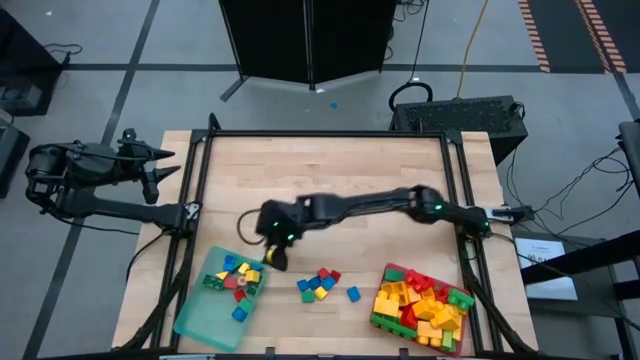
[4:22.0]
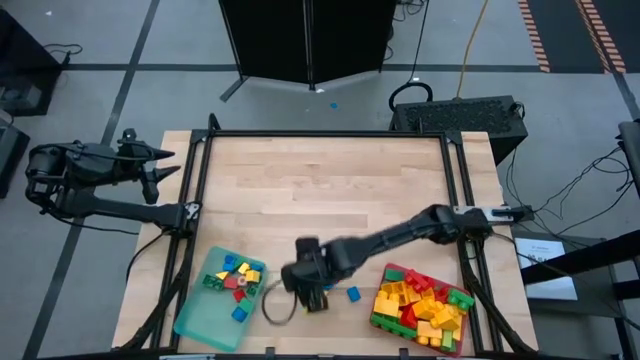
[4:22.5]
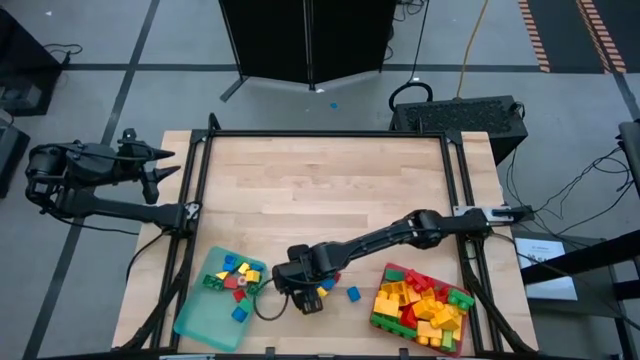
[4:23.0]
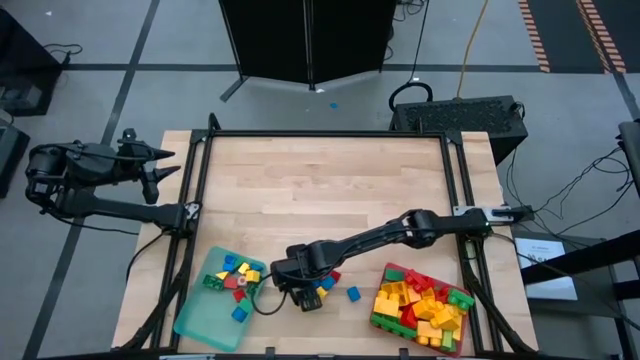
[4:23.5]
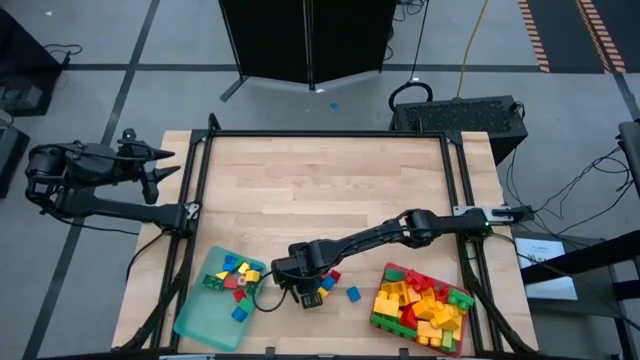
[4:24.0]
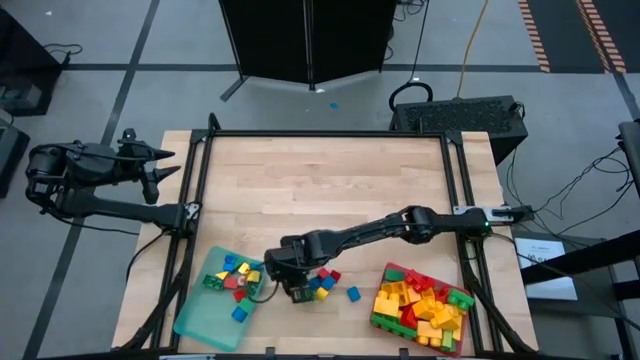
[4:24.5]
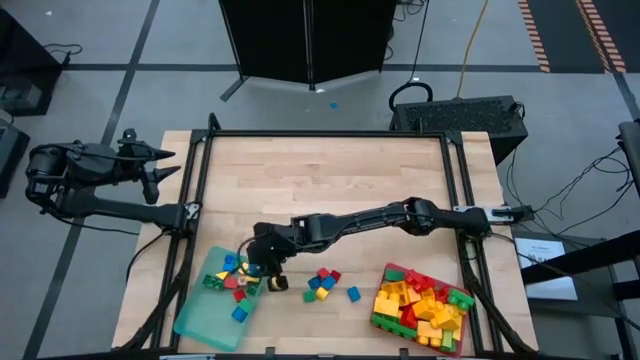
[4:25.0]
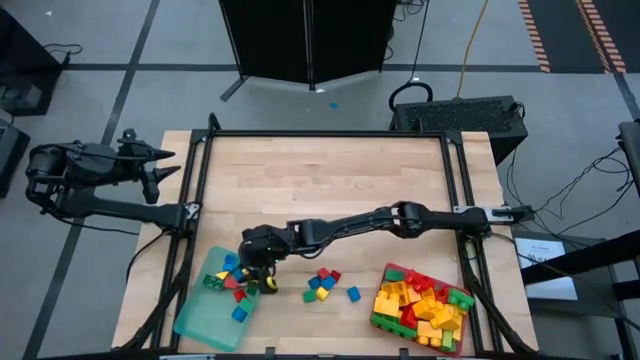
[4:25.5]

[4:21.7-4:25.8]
Task: Sort blocks by size
Put the blue block into the blue bin

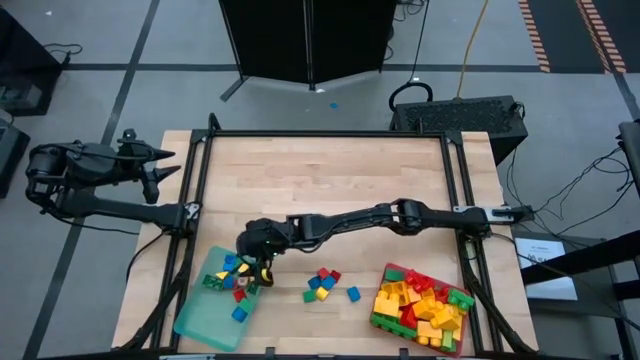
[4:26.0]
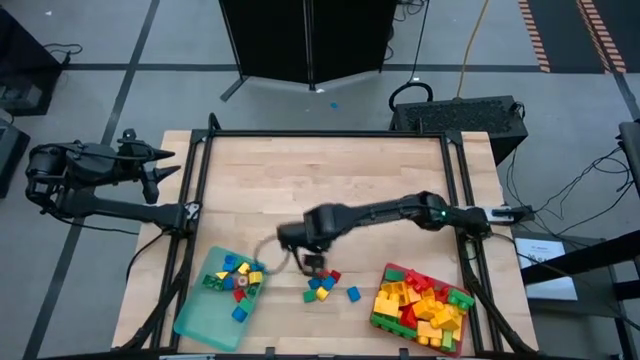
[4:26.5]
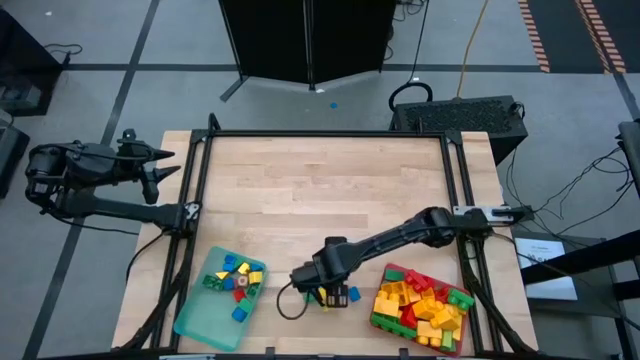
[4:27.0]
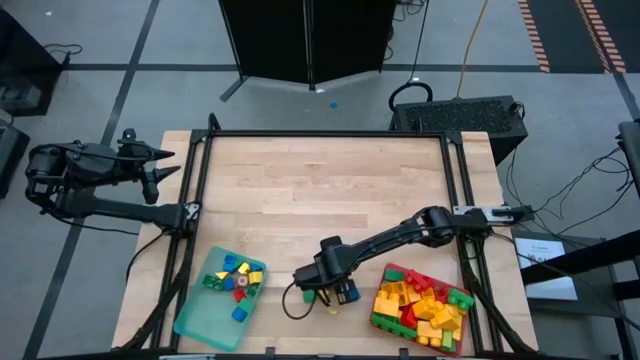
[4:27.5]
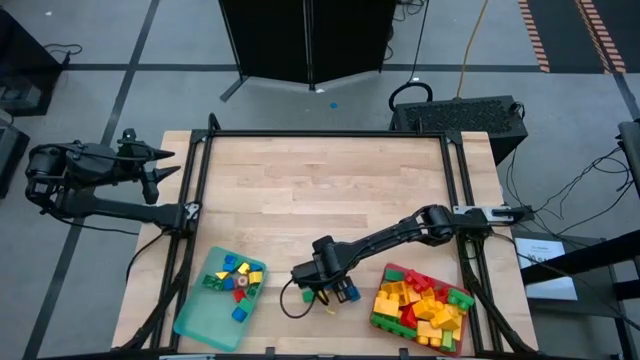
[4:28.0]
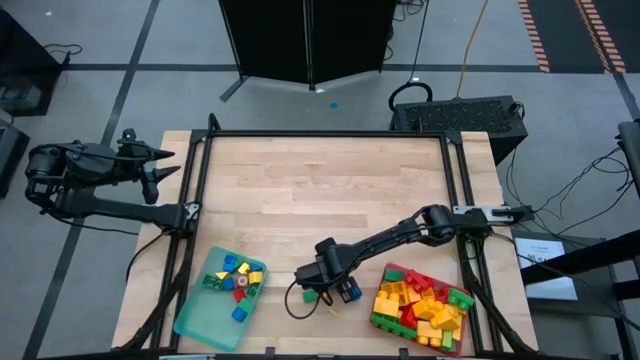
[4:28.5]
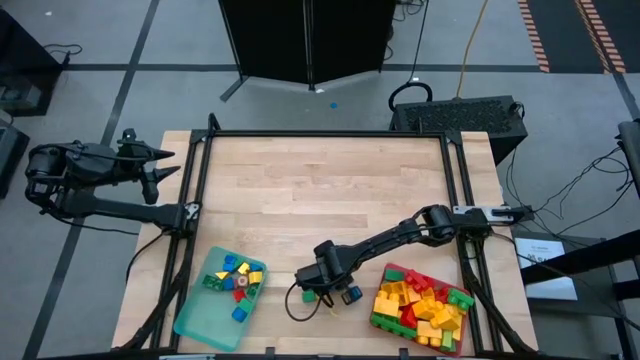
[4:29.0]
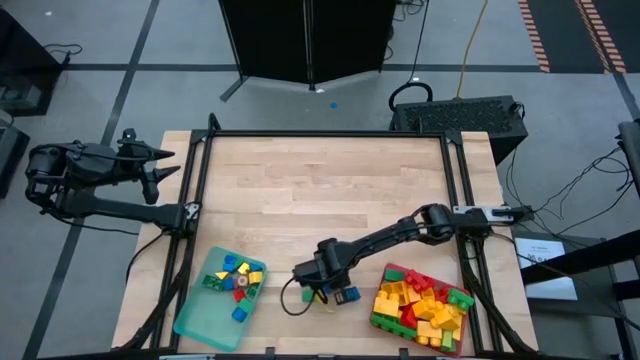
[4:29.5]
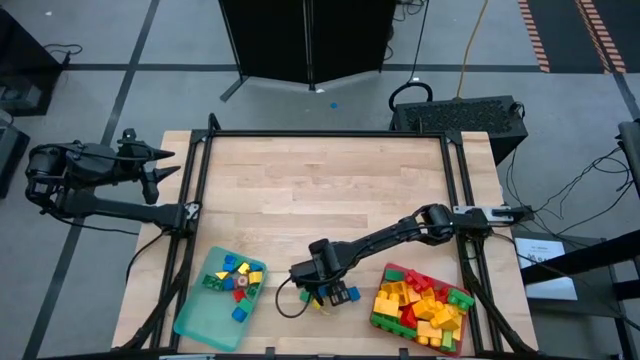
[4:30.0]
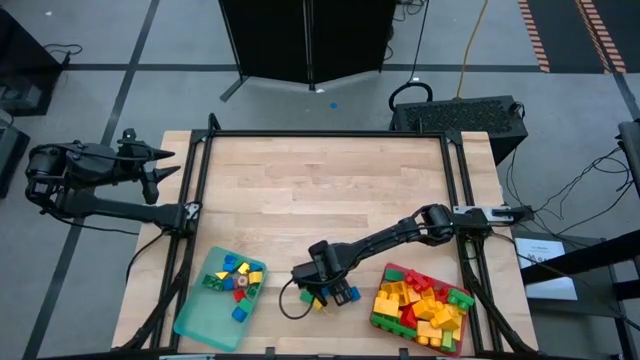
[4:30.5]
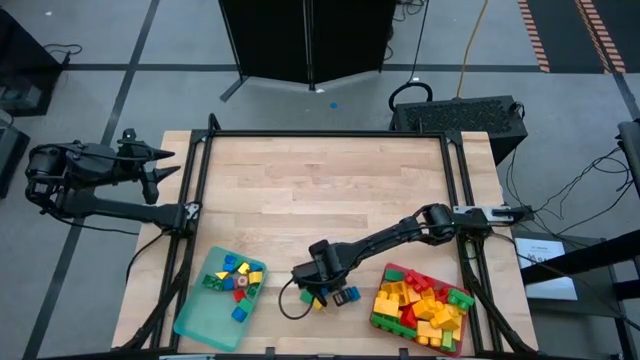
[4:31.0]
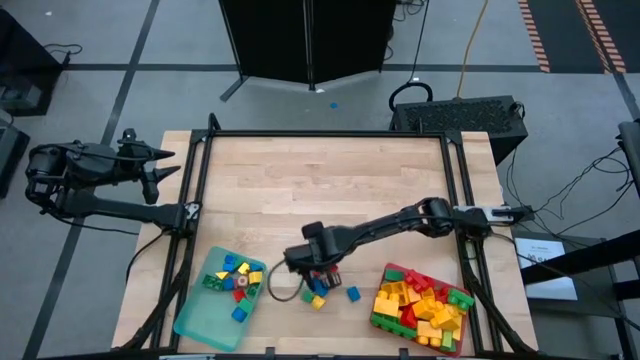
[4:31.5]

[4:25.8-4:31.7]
Put the red block into the blue bin

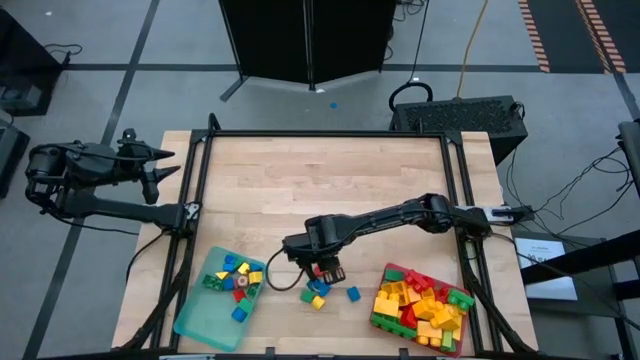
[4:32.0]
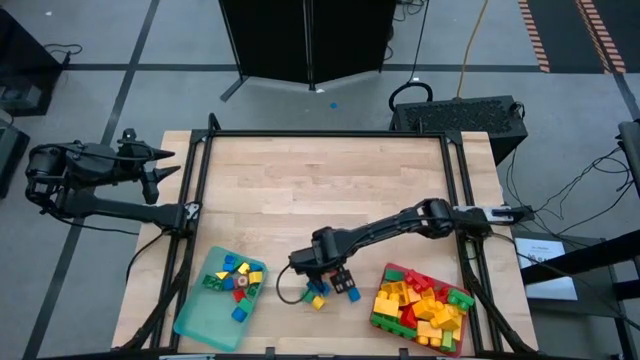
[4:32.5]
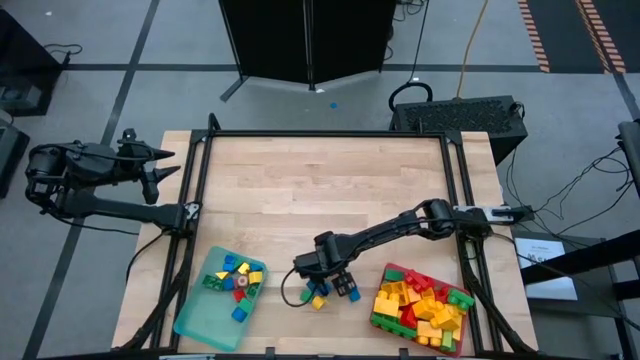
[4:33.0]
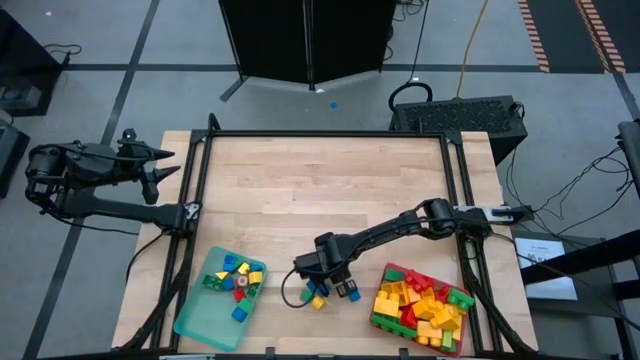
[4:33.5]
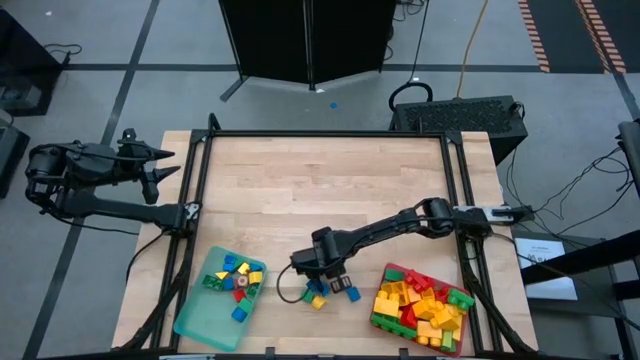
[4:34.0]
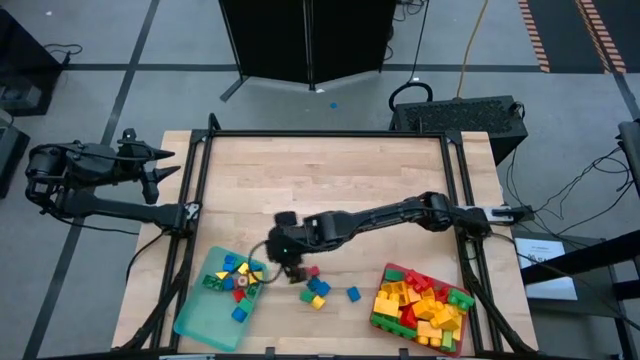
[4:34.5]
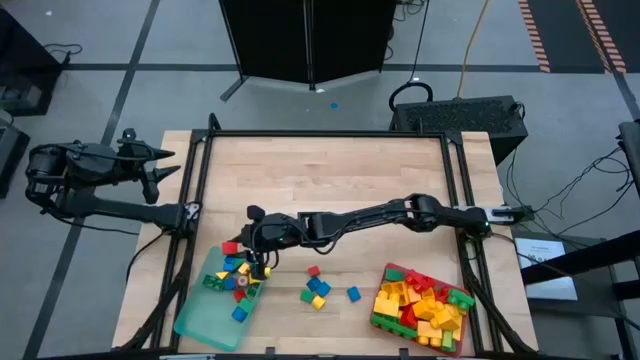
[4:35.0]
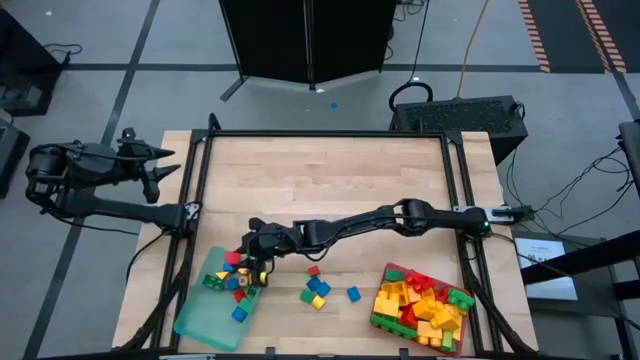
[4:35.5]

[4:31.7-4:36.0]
Put the red block into the blue bin

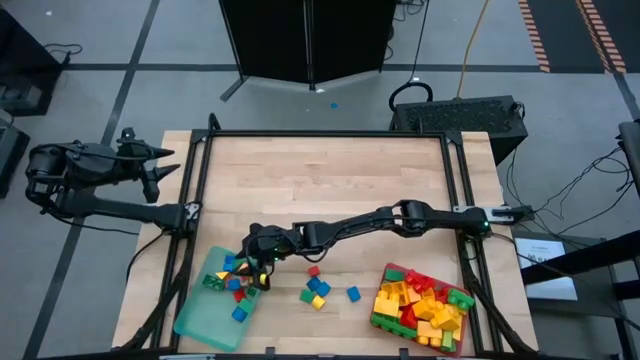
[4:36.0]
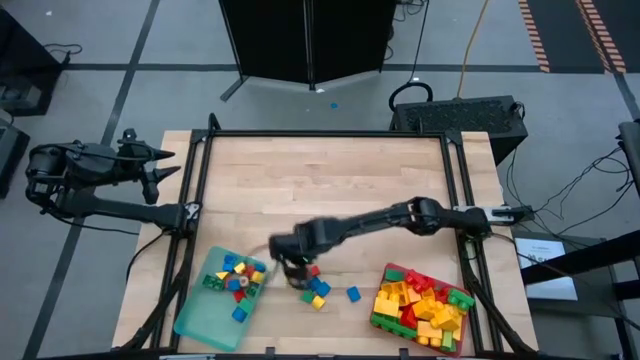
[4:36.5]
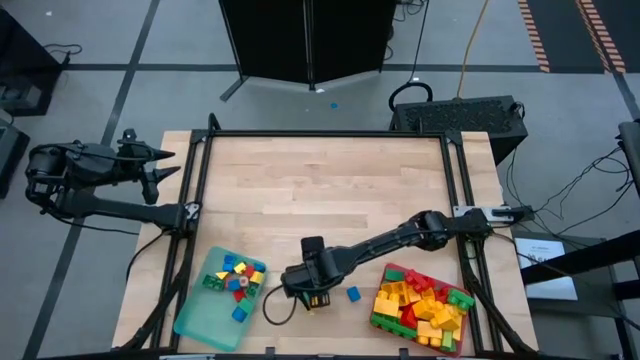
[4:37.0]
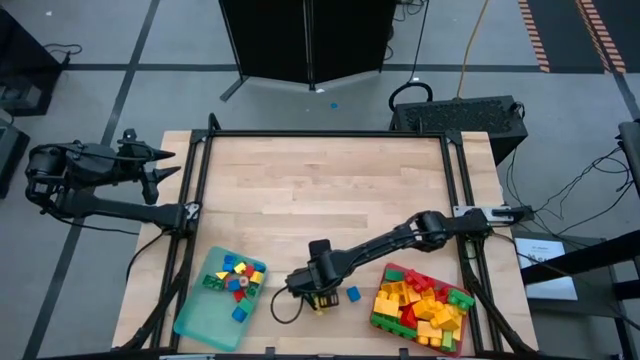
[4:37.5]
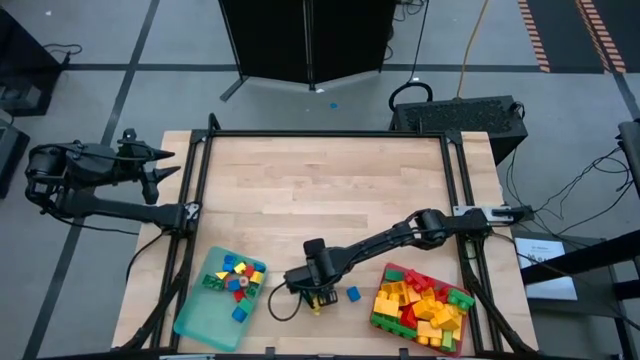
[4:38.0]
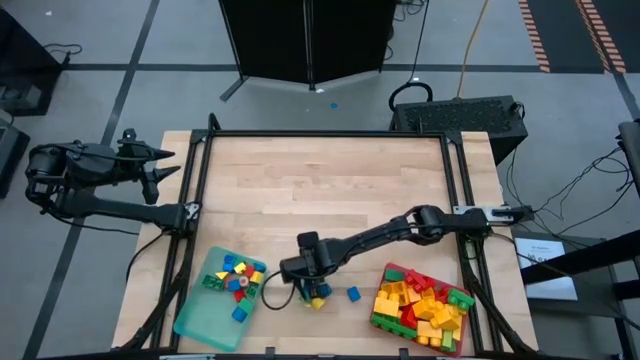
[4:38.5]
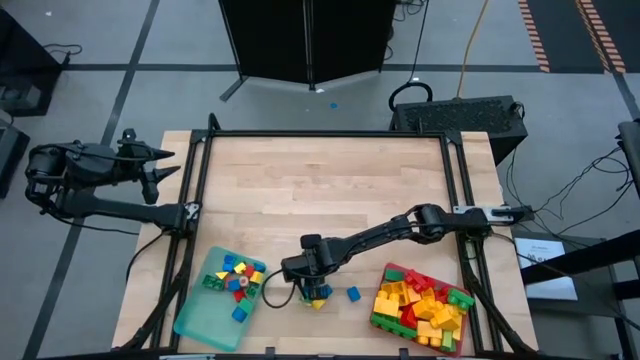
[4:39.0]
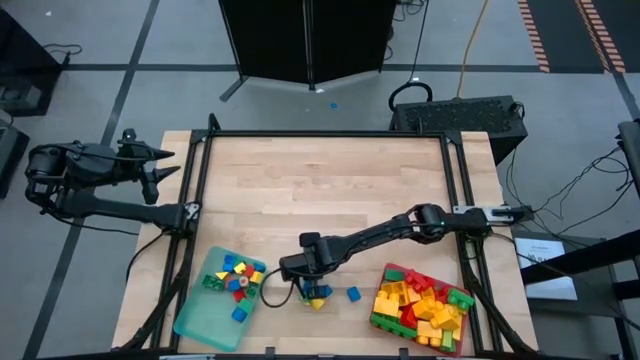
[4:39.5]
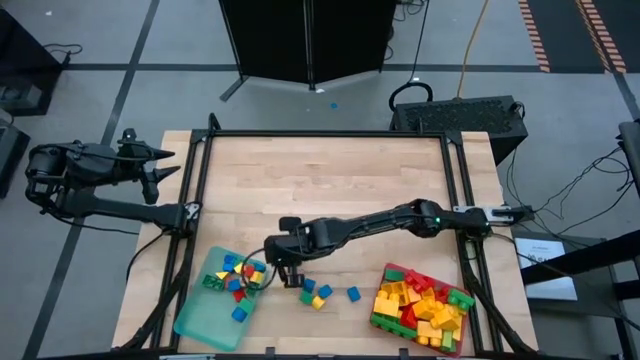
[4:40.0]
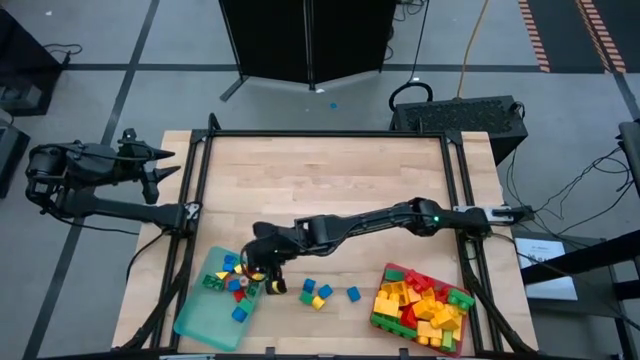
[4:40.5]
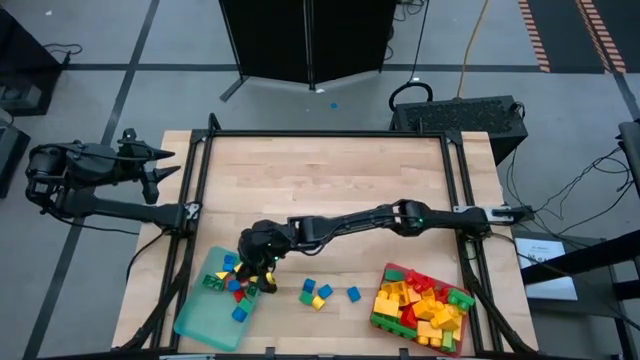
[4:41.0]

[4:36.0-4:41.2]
Put the red block into the blue bin

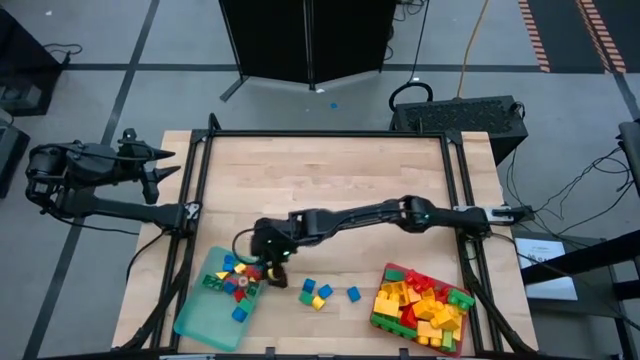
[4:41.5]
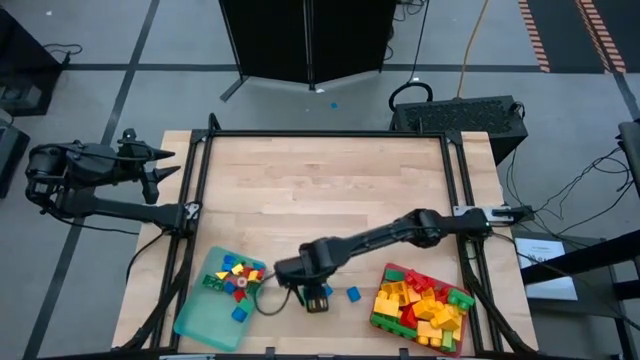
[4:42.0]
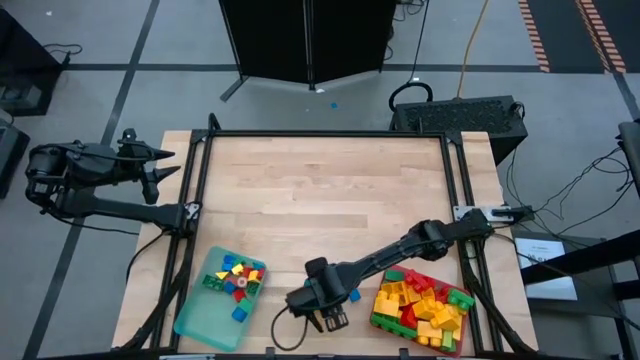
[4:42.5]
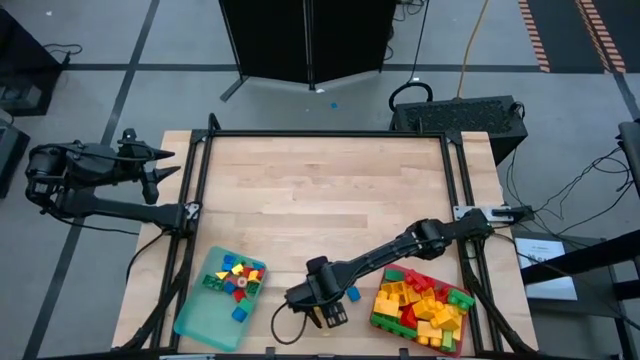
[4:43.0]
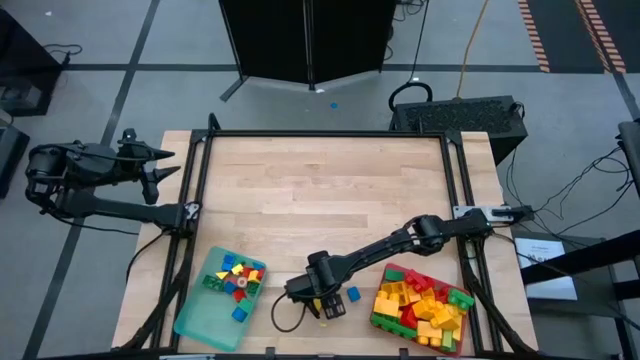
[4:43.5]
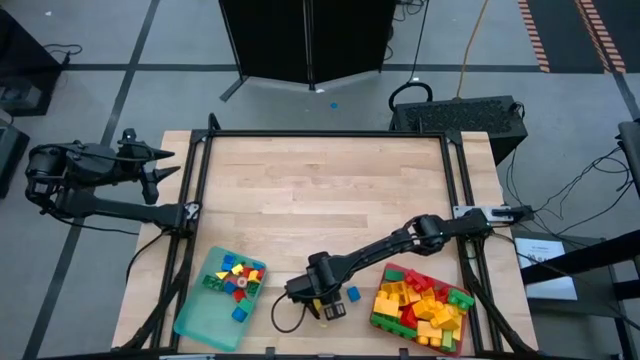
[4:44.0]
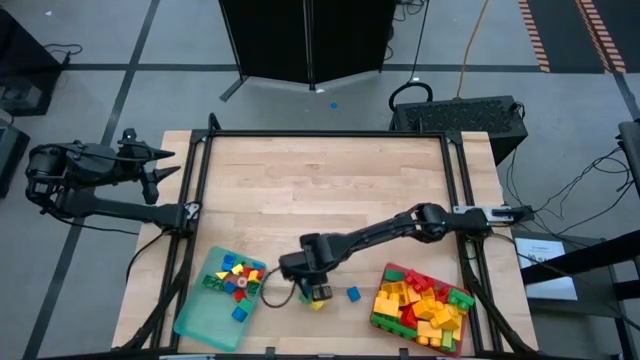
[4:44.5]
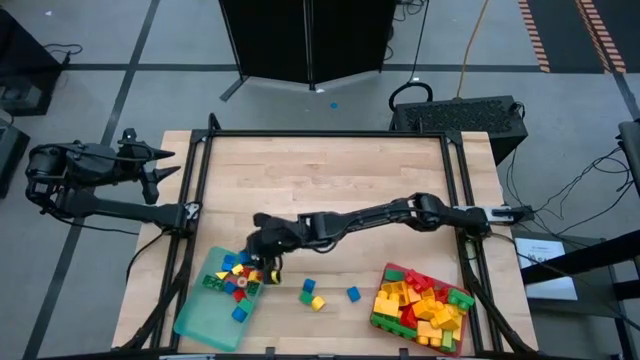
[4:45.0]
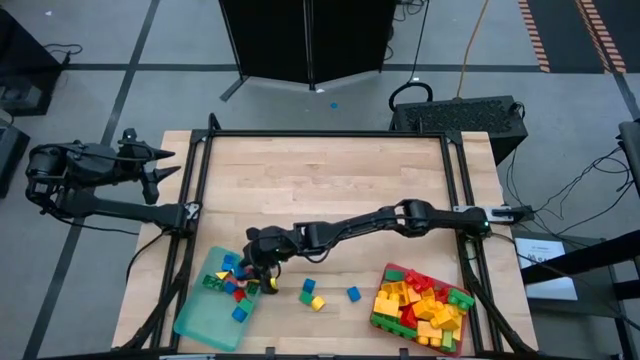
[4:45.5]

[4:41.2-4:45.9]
Put the blue block into the blue bin
